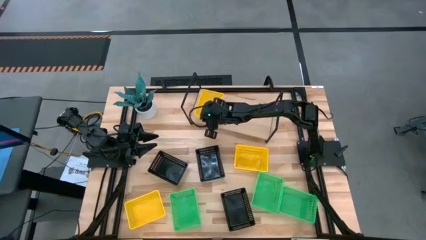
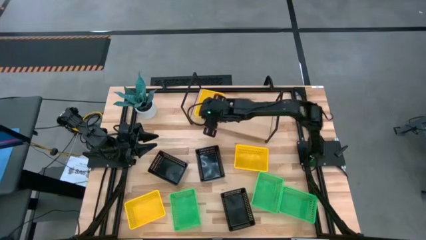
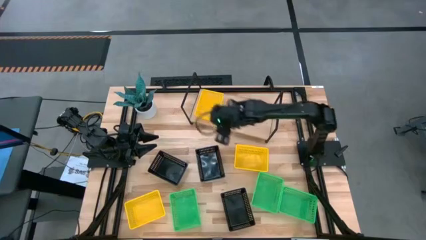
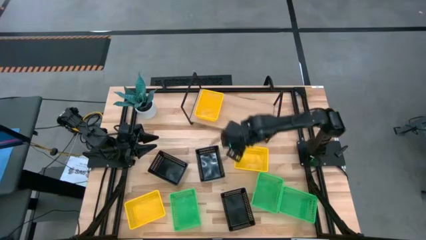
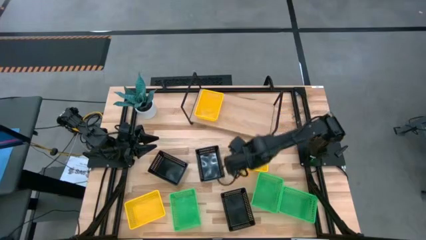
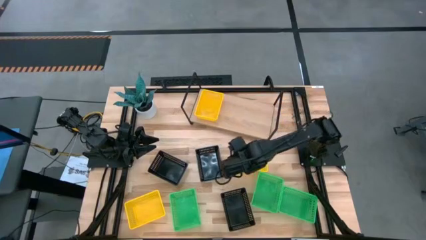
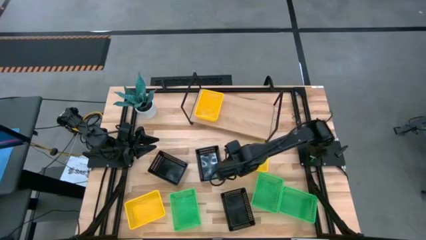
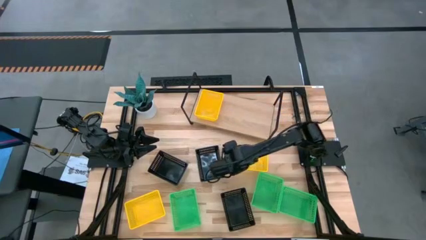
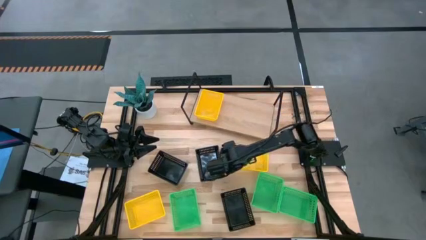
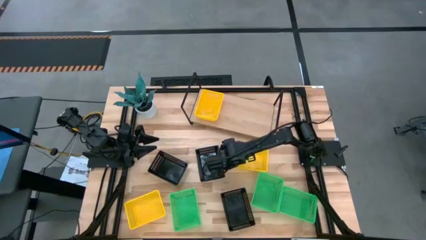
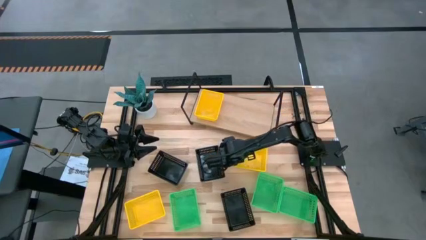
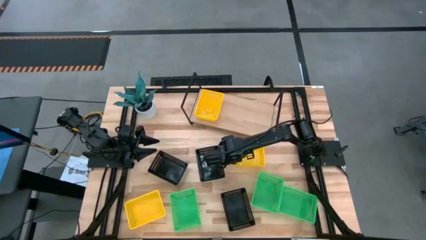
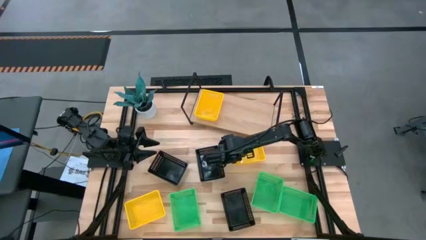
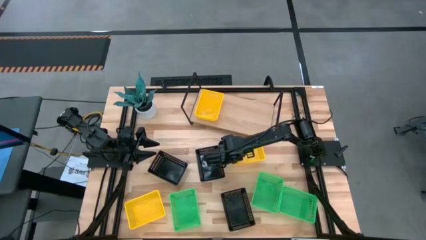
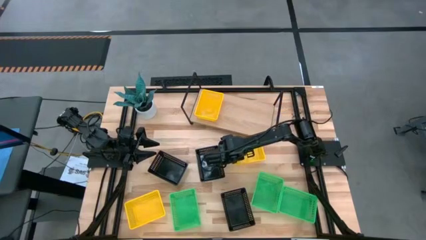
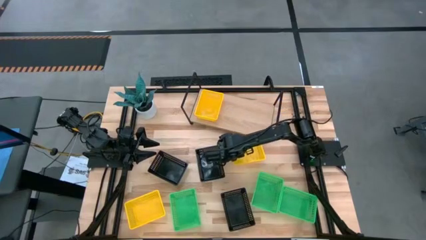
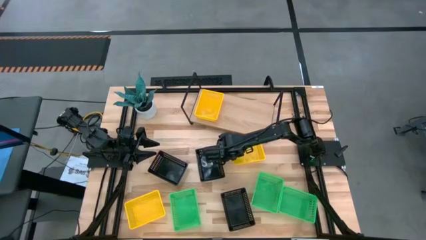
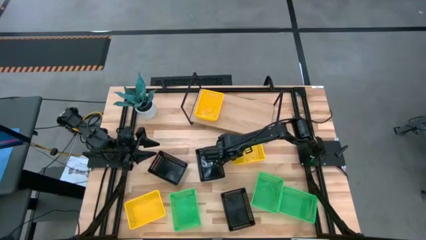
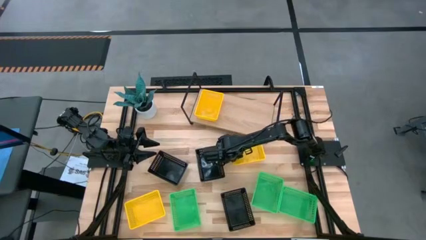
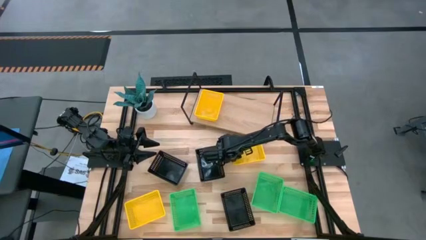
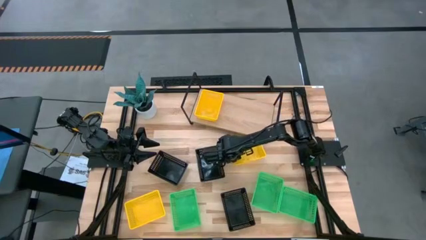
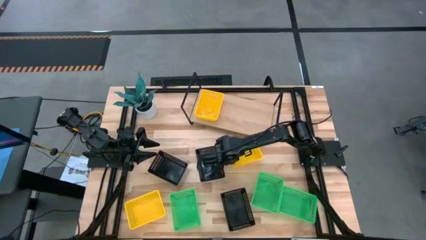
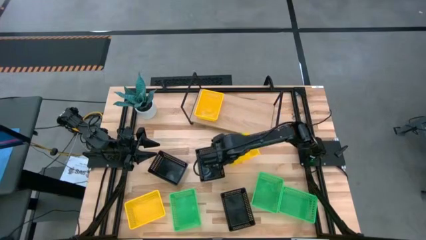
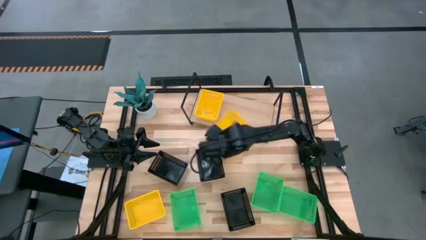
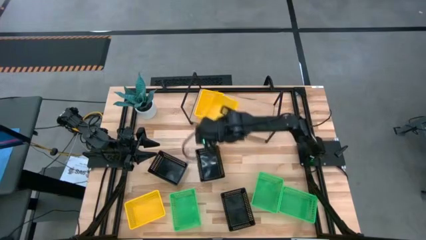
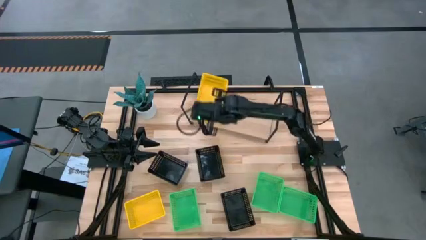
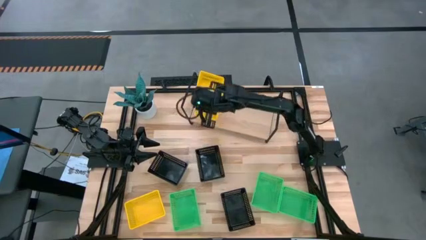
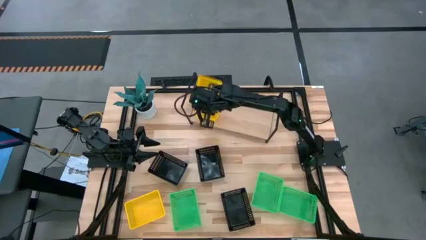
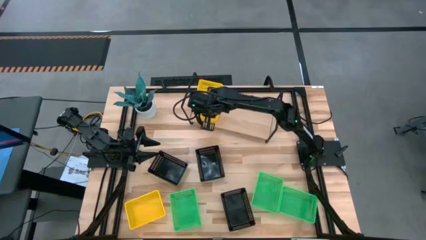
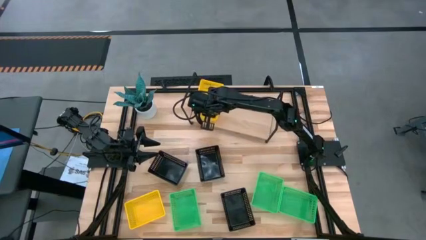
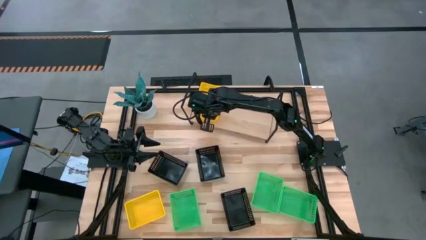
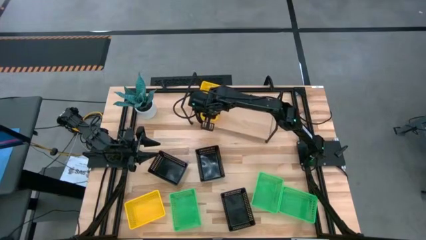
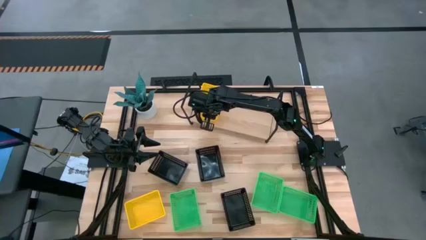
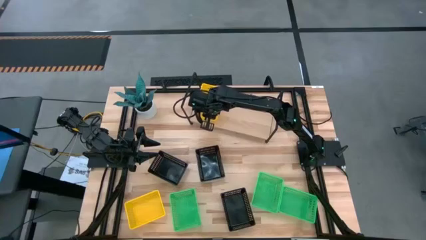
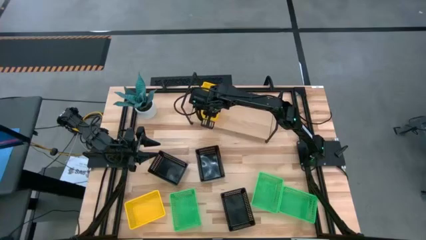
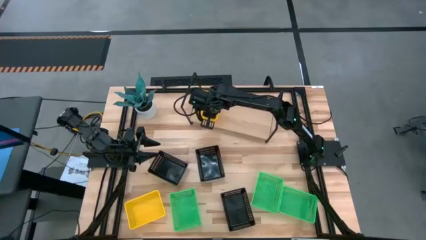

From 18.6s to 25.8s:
Task: Stack baskets on shelf by color
Stack the top yellow bin on top of the yellow bin on the shelf

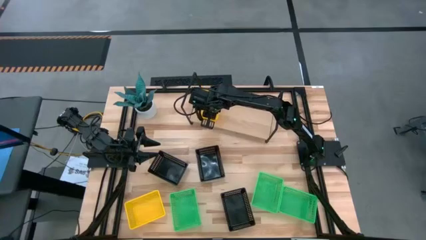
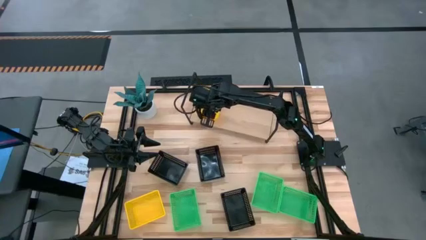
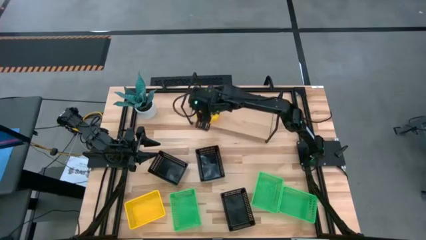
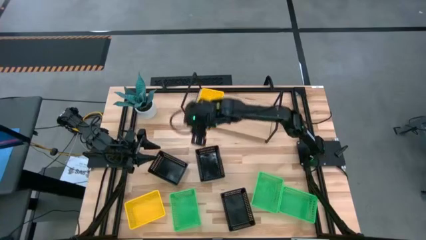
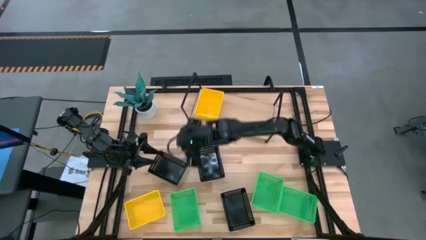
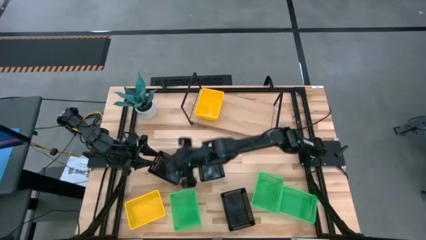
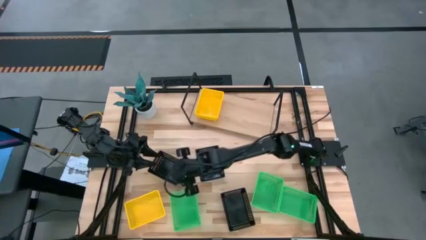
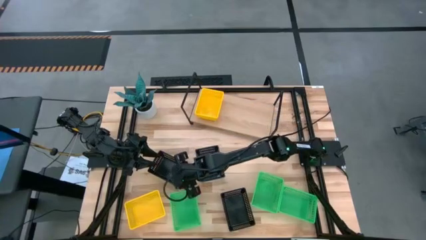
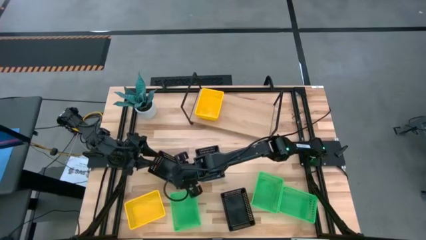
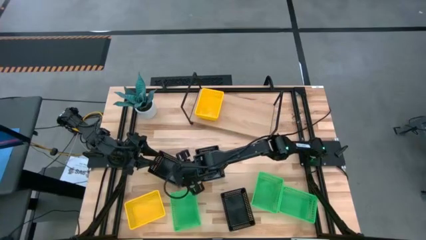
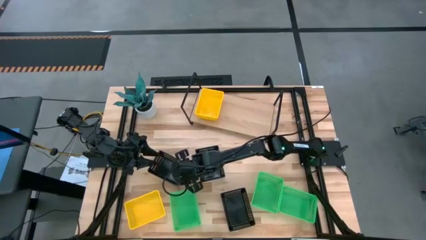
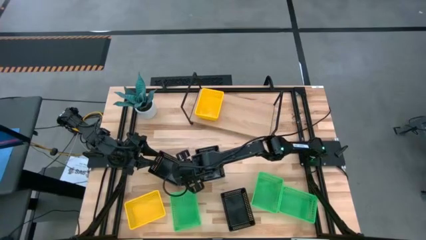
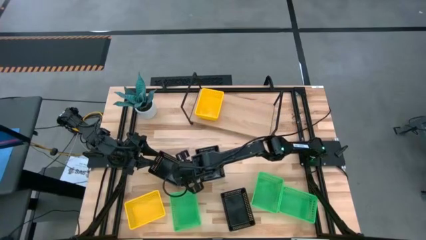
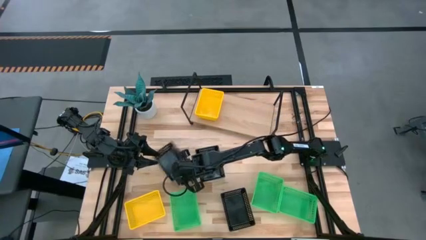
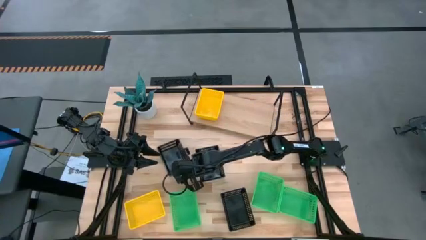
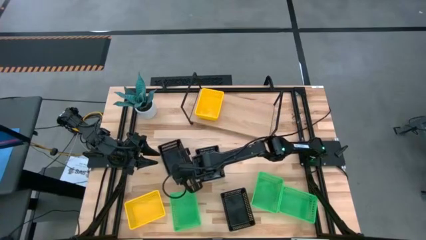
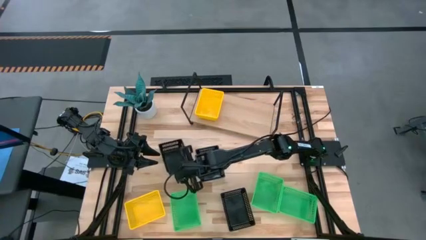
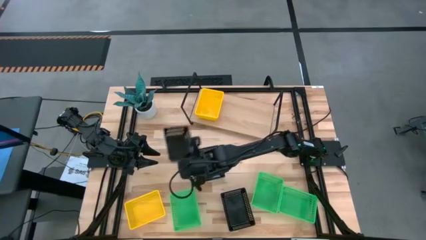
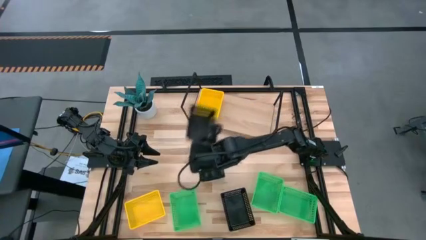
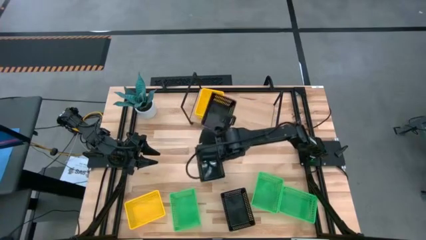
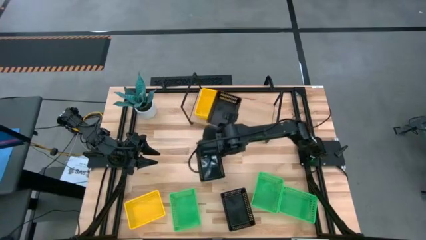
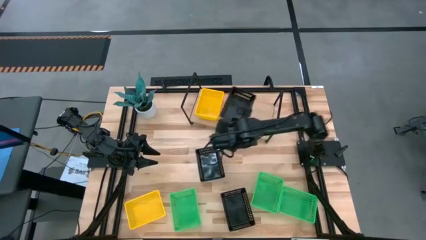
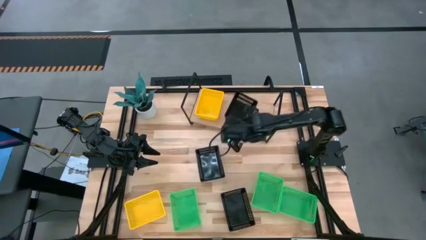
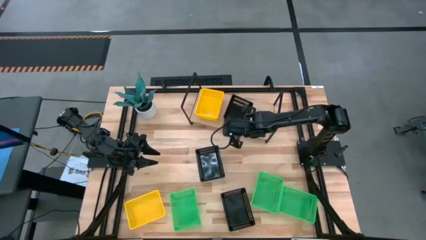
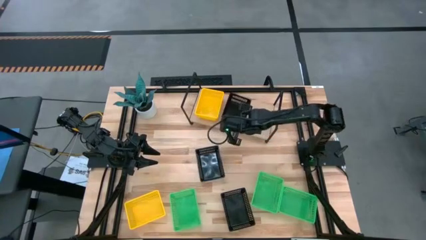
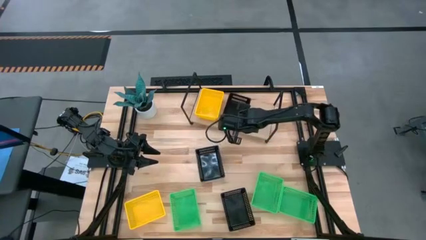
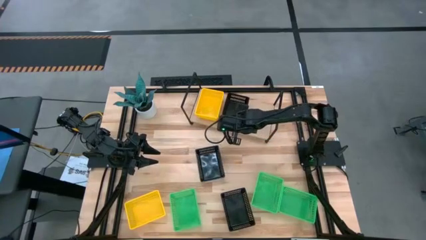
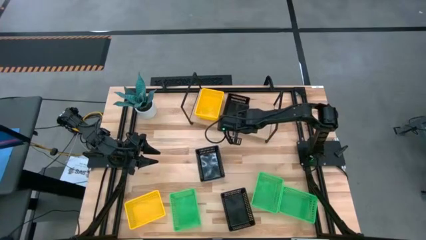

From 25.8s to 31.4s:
Put the left black bin into the shelf

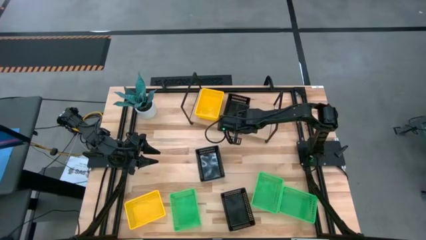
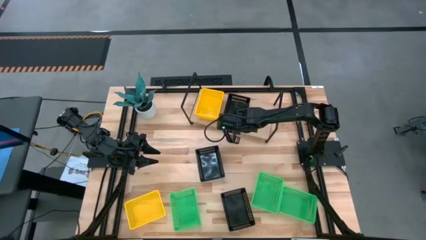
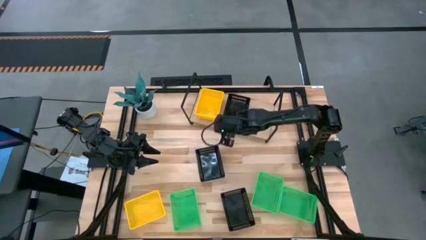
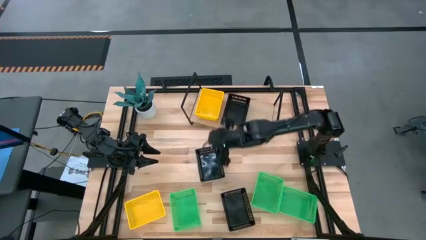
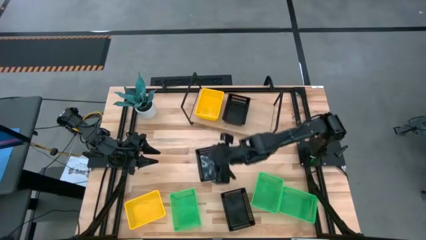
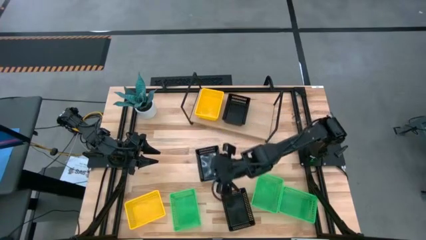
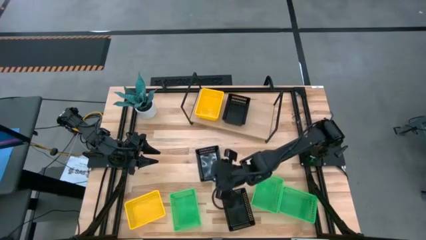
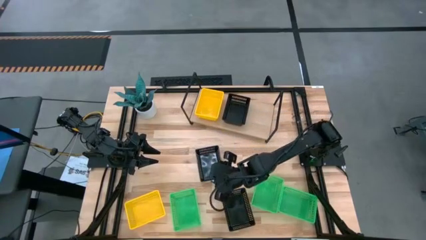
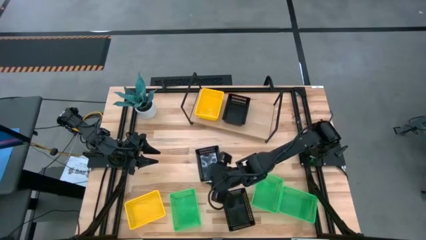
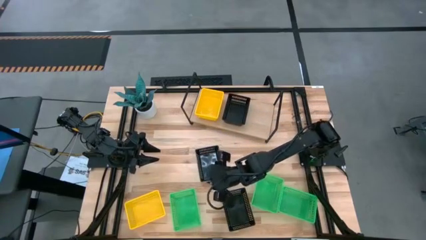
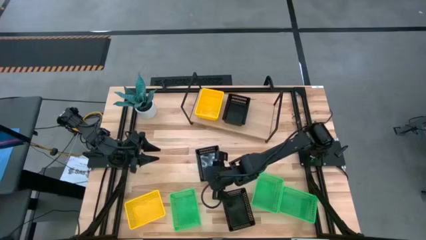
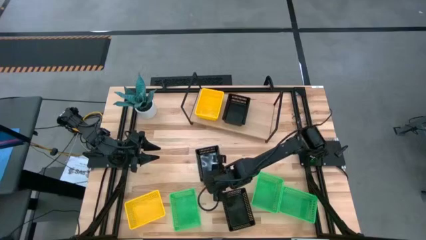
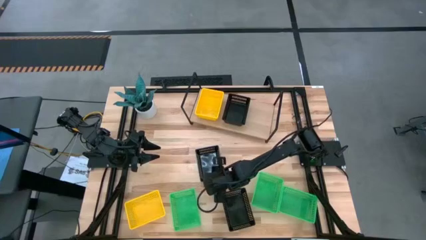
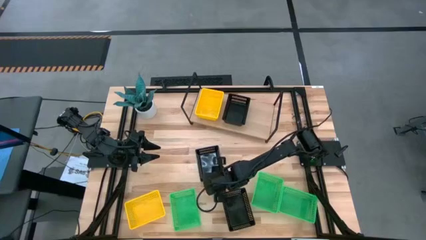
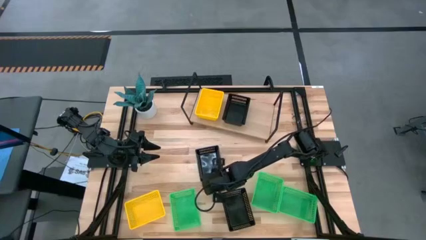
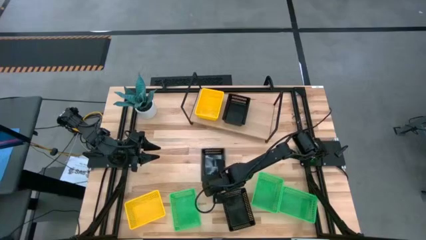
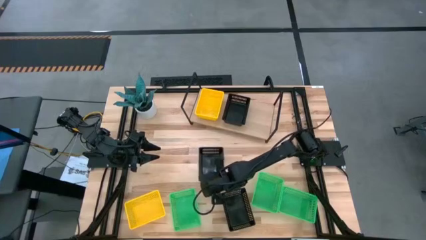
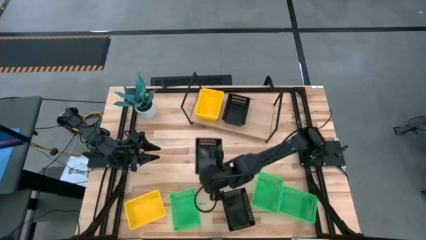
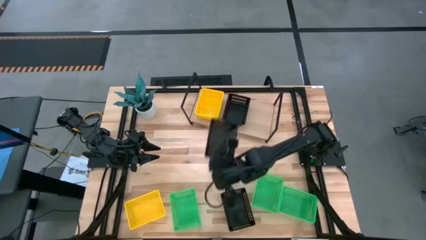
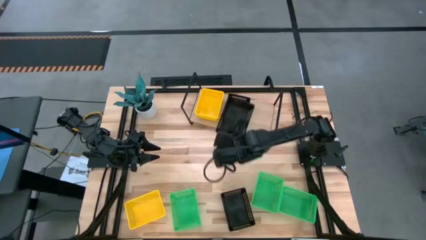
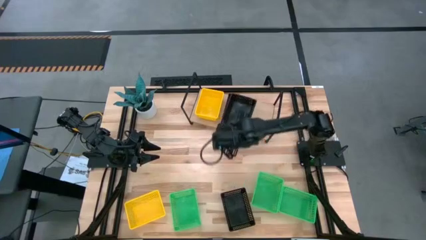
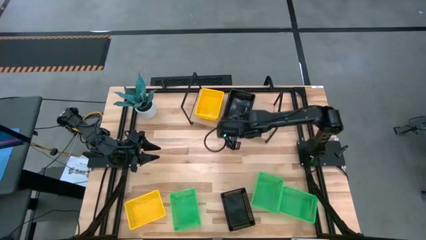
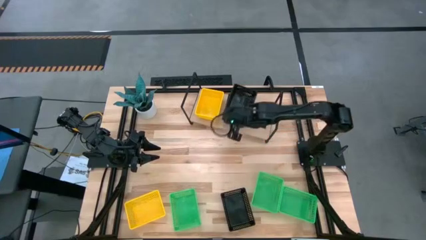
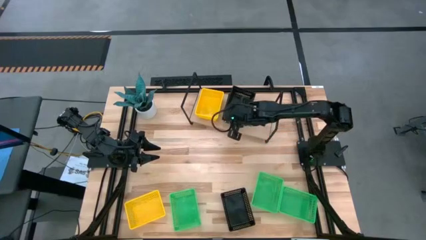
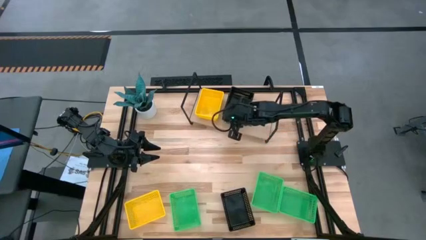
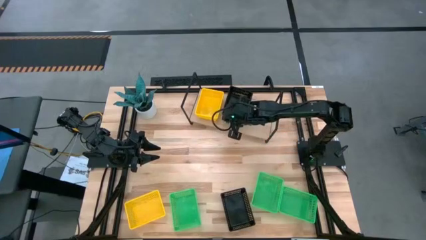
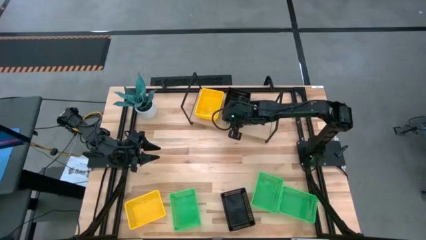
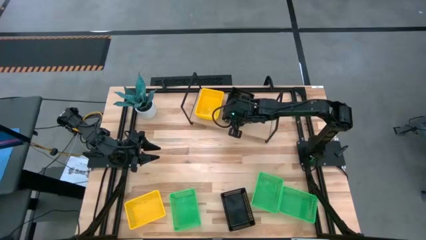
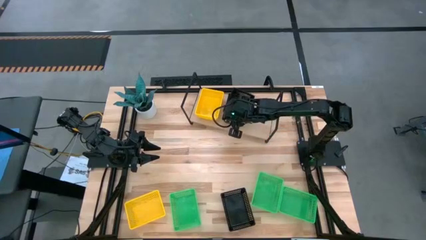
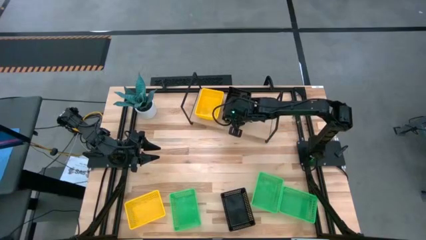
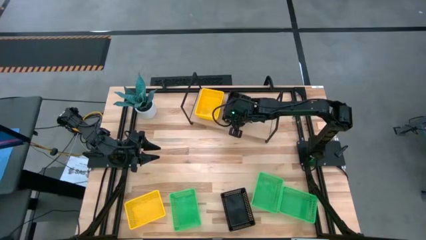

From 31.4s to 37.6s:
Stack the top black bin on top of the black bin on the shelf
